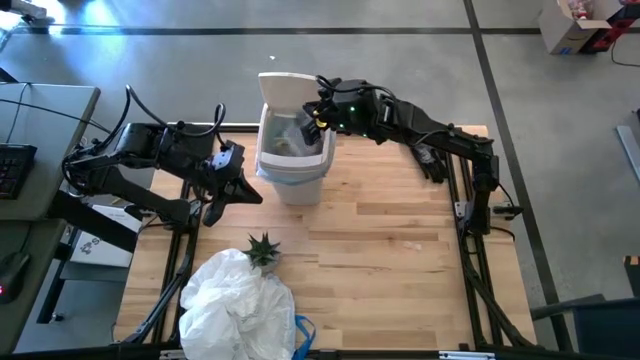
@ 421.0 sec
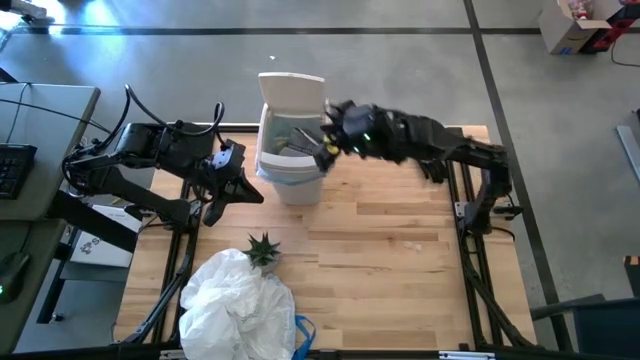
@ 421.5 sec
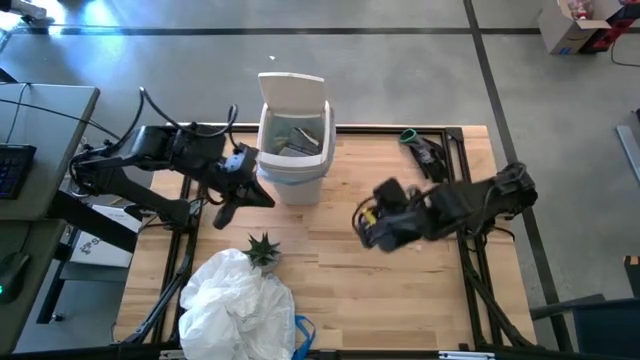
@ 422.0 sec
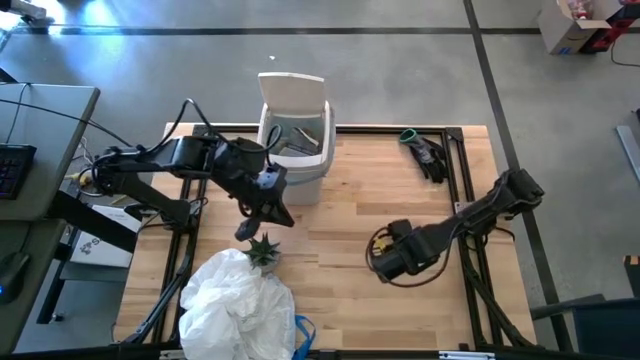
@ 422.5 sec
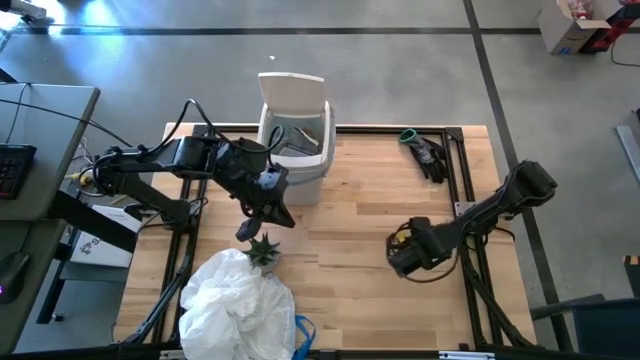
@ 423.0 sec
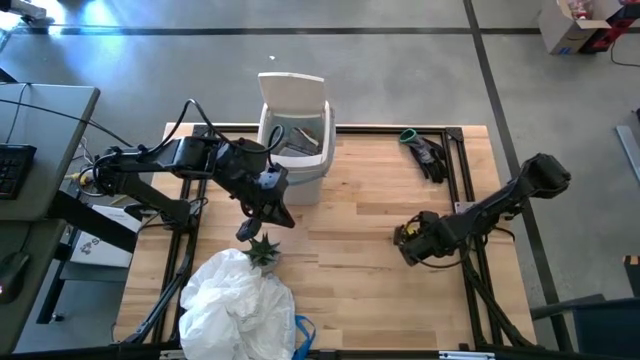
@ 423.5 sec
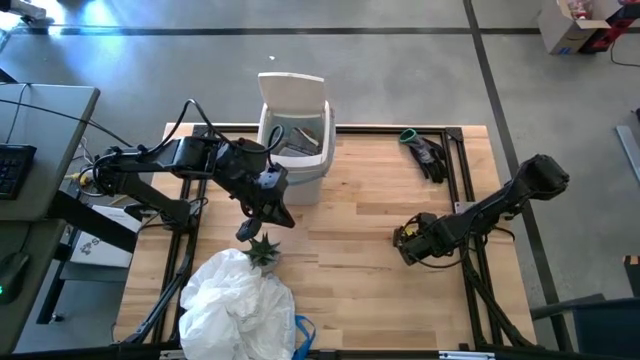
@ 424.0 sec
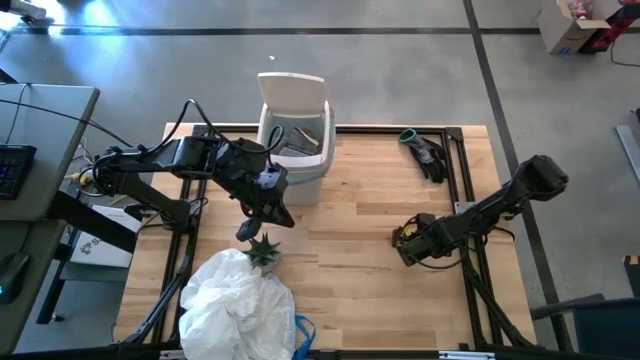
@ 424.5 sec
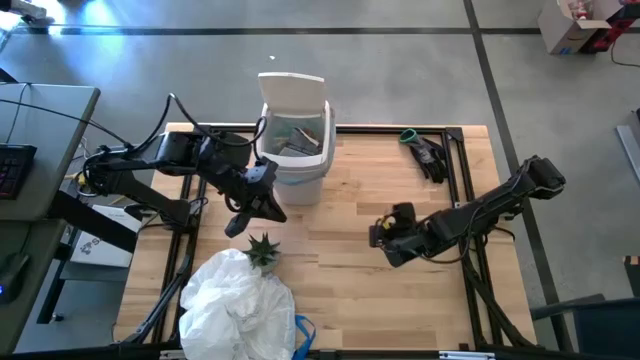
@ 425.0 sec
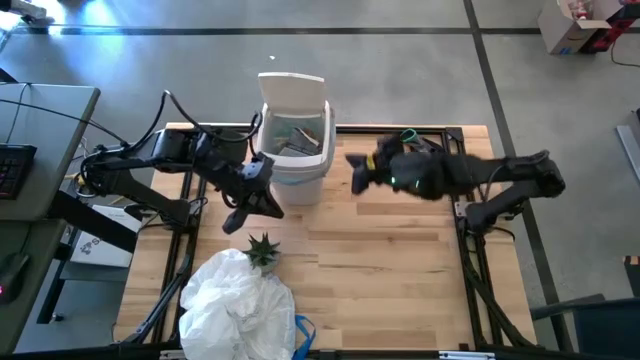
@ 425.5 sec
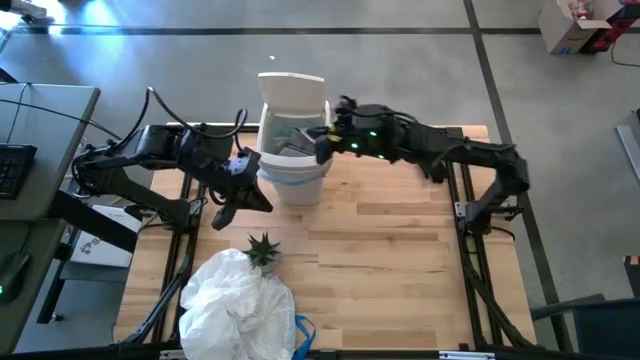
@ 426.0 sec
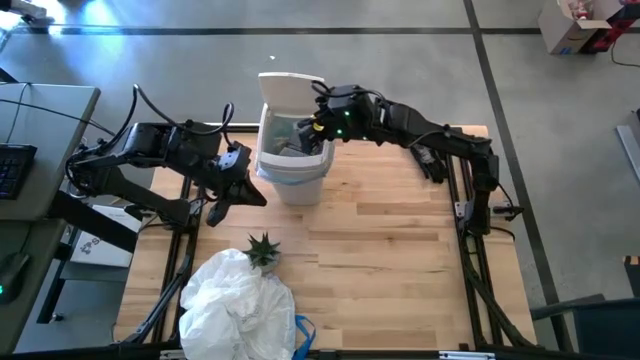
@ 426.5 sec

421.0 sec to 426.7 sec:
Task: place trash/remove bag and relplace
Put the transparent plastic into the trash bin

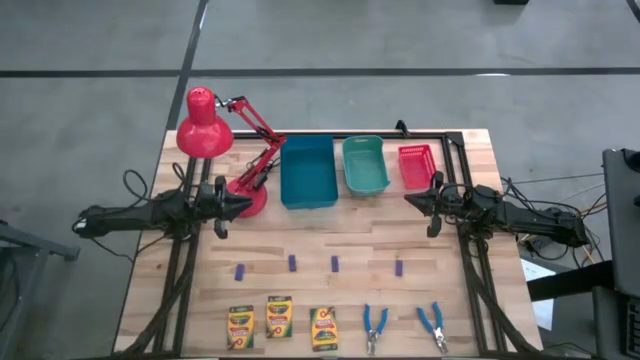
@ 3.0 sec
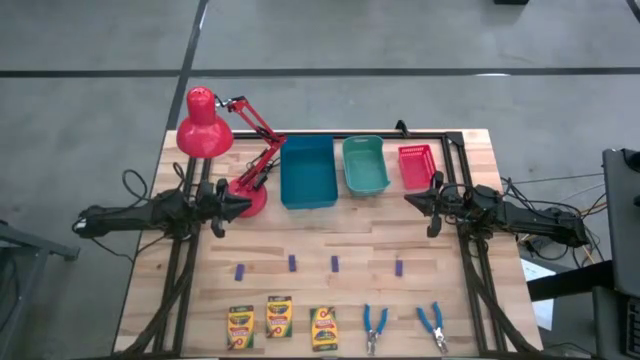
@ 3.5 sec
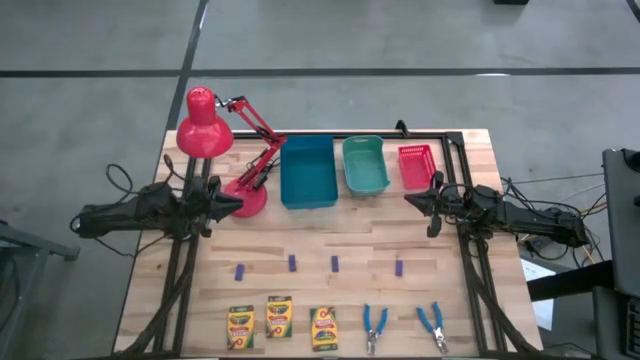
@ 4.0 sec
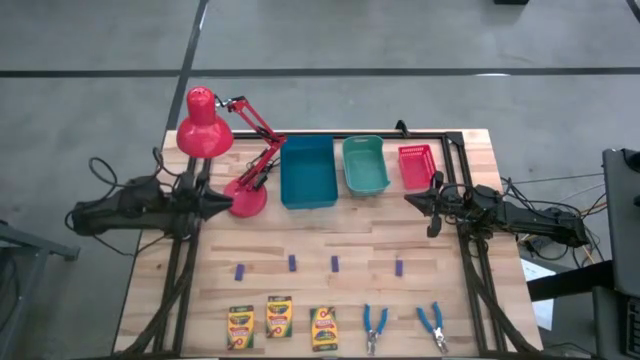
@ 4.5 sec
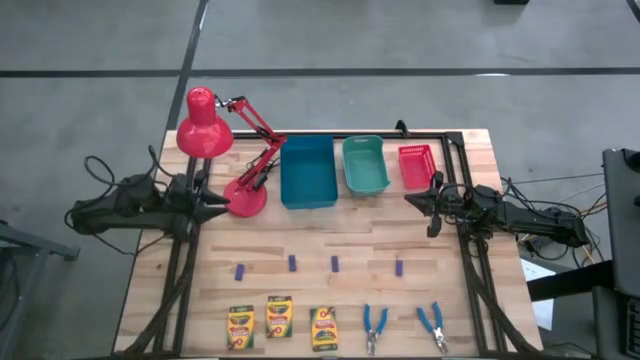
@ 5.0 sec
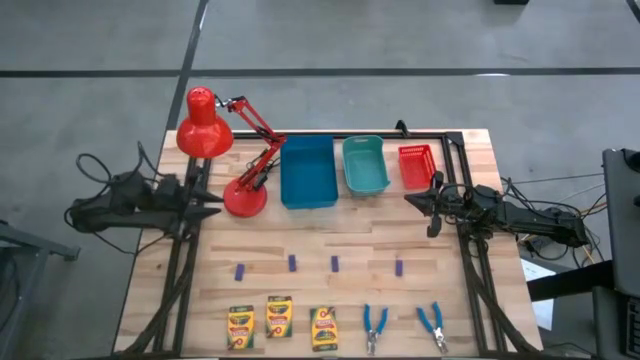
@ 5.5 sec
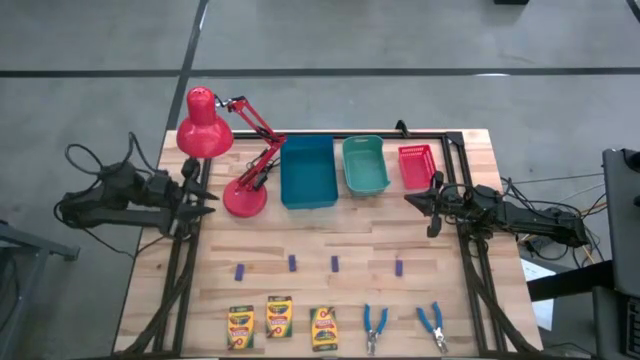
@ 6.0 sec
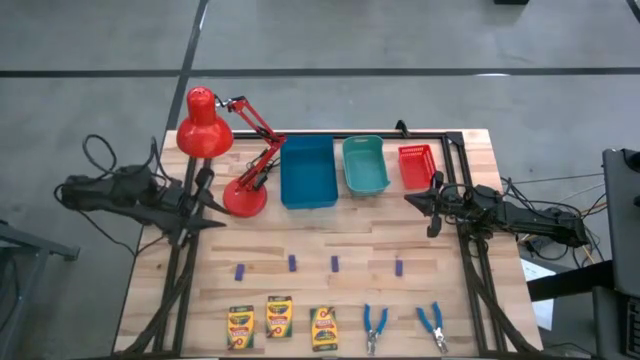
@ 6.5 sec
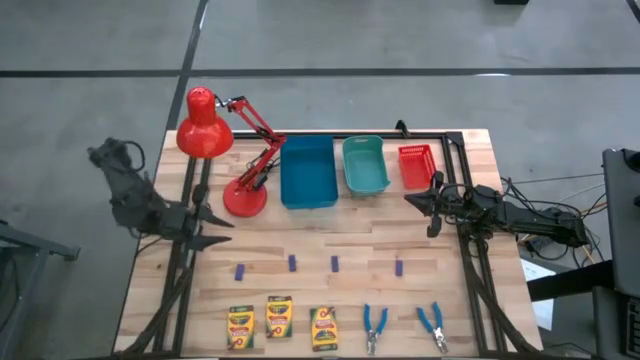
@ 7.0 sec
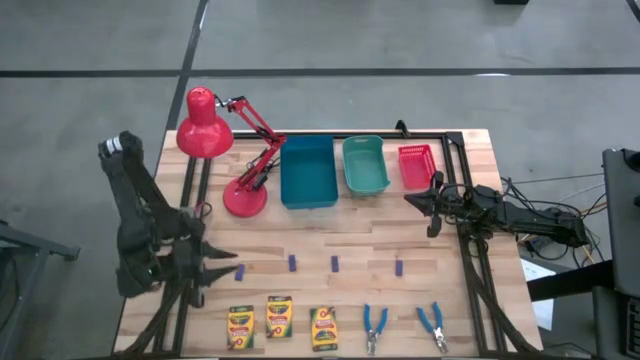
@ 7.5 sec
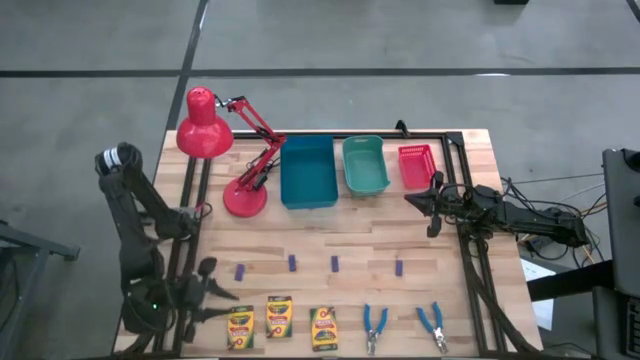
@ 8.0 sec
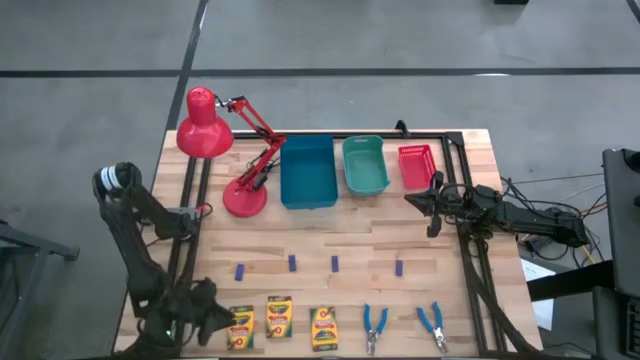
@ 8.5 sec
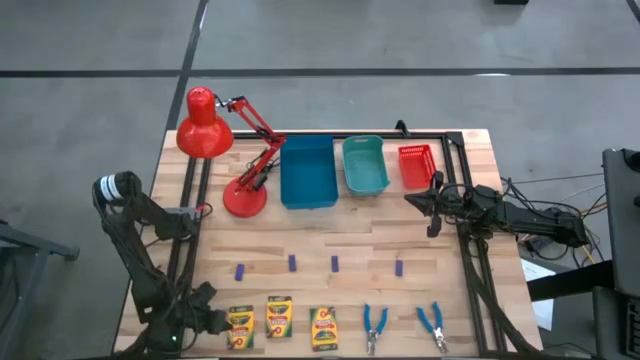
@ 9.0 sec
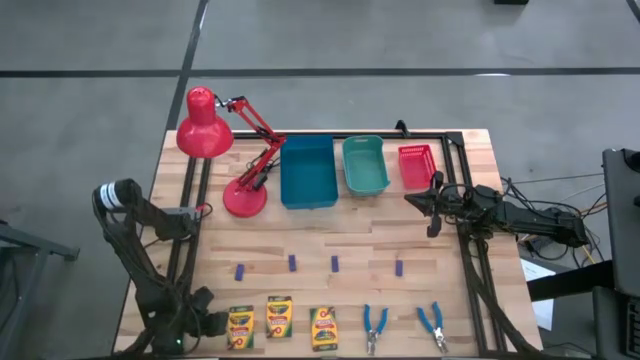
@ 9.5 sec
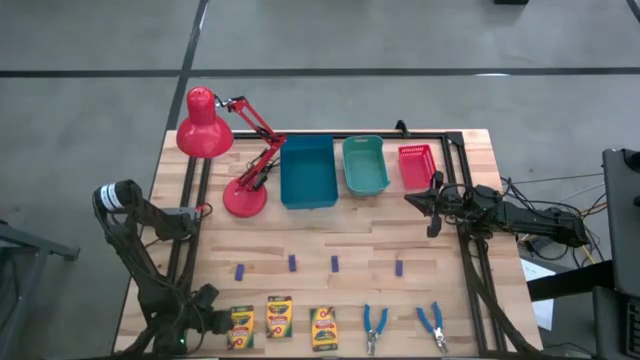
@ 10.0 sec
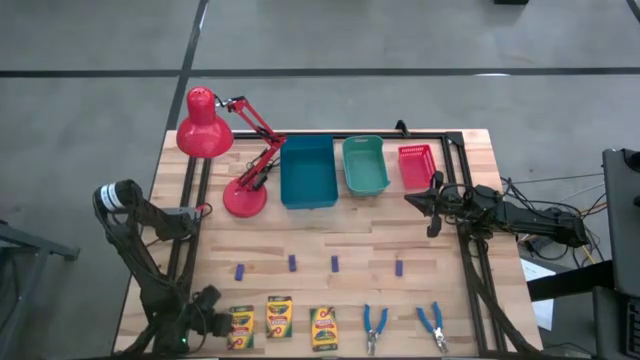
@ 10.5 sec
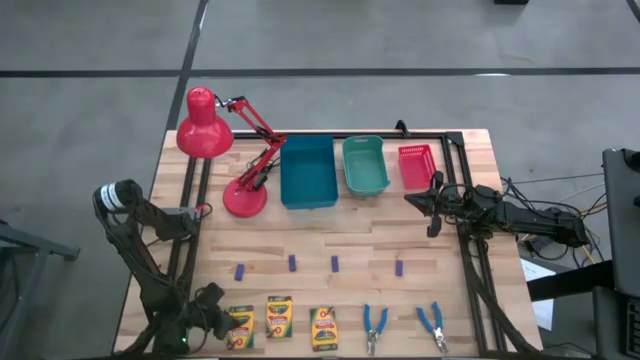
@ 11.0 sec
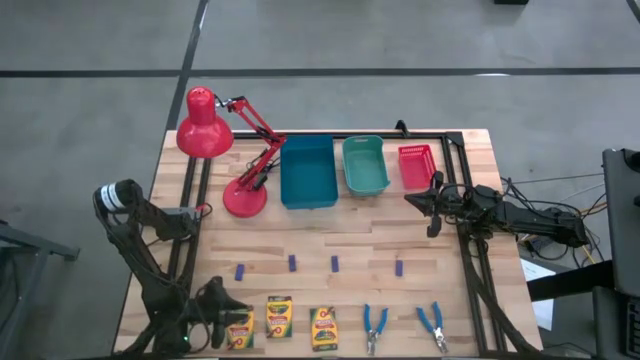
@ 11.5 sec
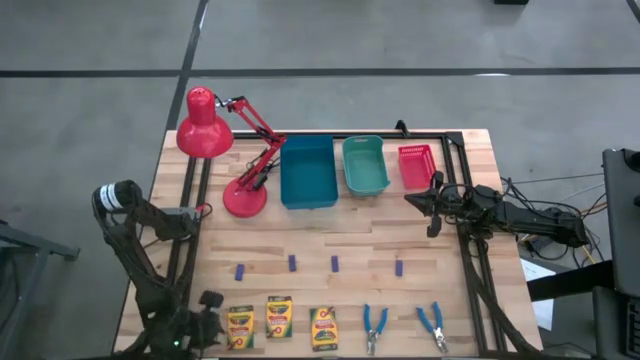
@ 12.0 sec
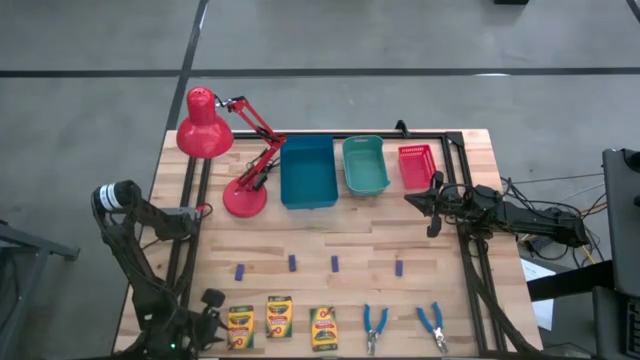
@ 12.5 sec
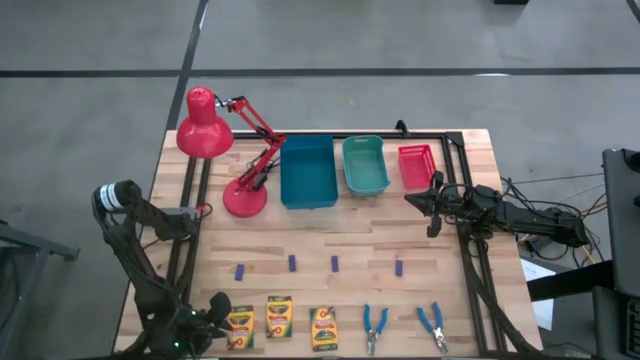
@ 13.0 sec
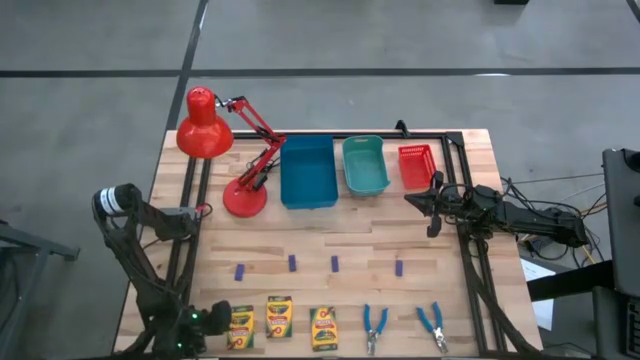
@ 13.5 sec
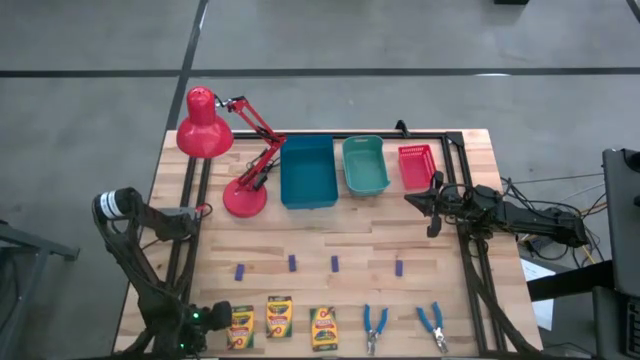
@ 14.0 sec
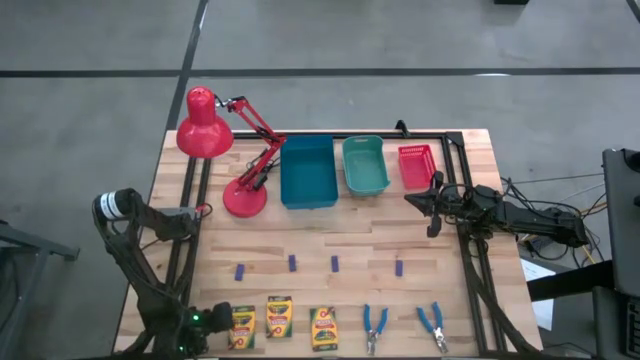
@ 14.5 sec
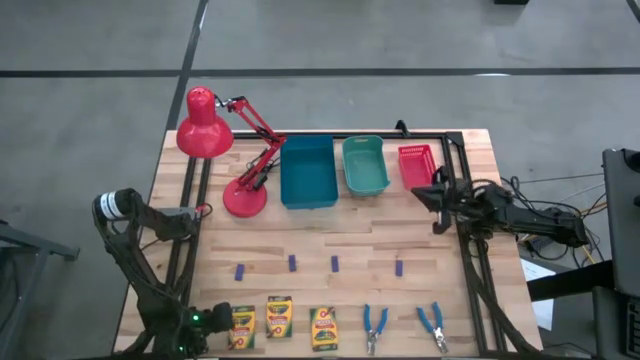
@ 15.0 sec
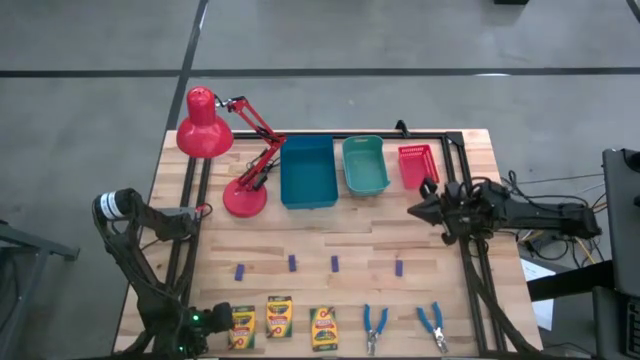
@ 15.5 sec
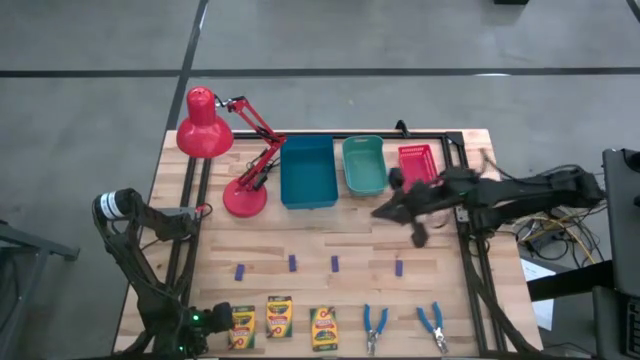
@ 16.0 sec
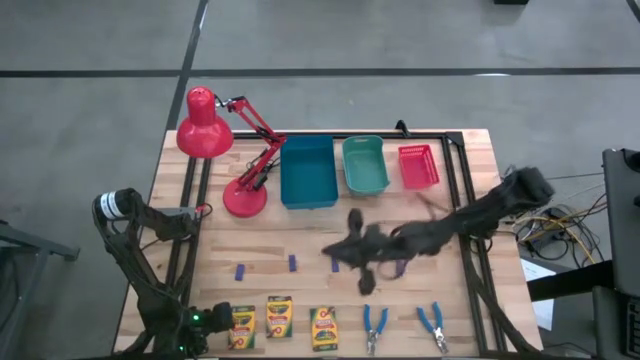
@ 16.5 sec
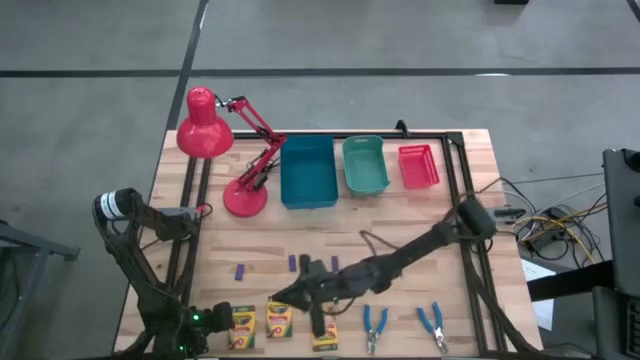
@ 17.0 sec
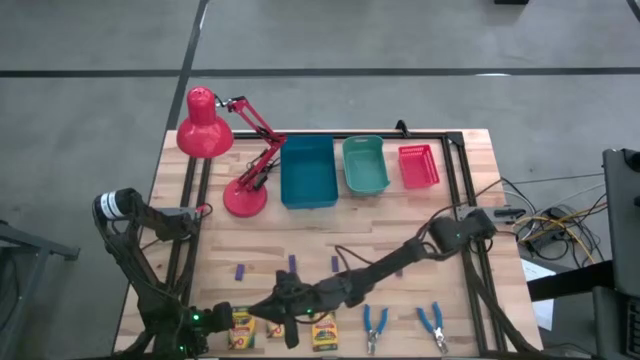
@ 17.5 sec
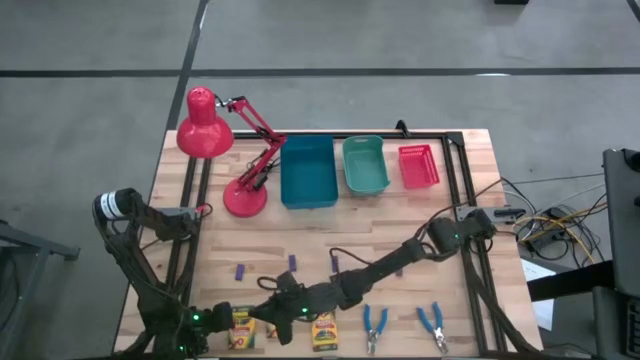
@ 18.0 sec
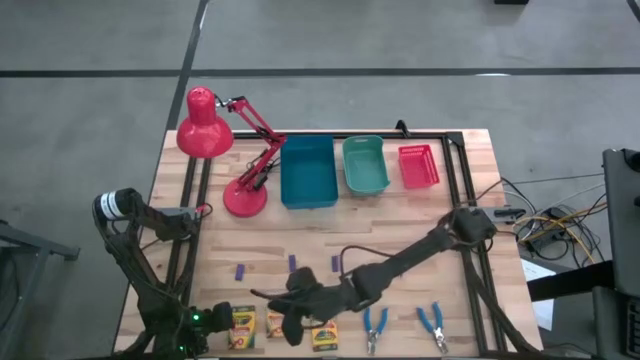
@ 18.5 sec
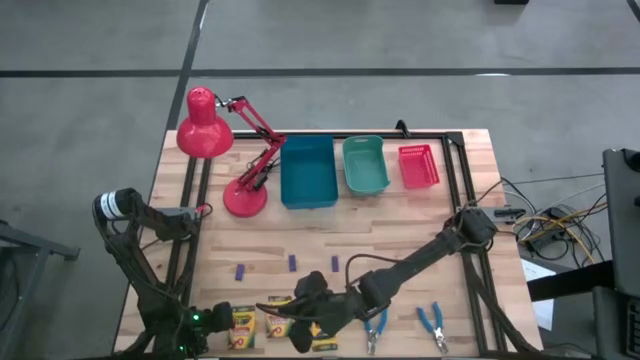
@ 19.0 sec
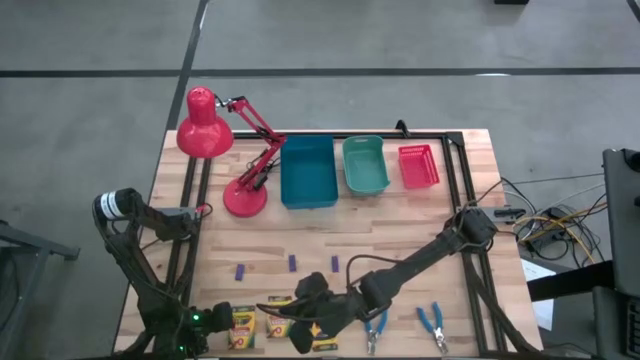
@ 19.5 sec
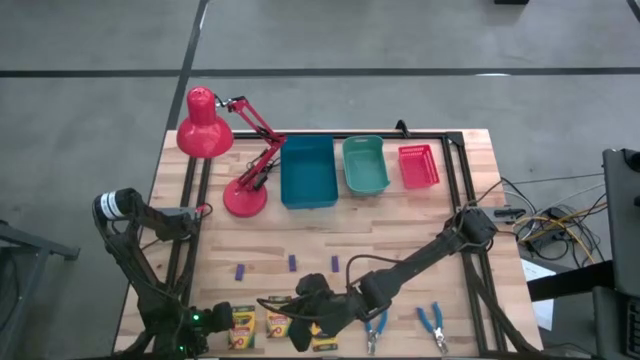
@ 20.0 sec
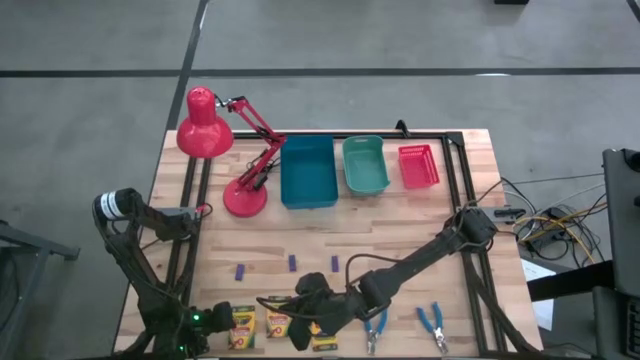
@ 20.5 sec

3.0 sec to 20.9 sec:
Task: Pick & Place School Supplies
Put the crayon box into the blue bin
